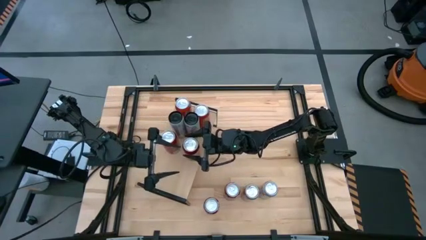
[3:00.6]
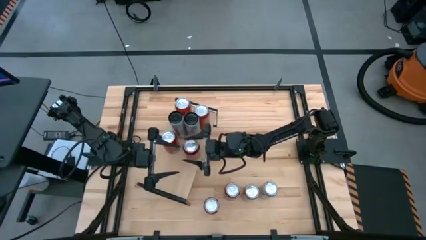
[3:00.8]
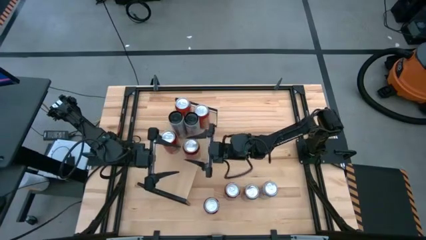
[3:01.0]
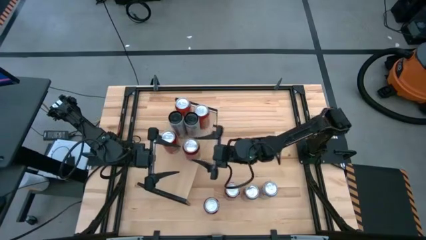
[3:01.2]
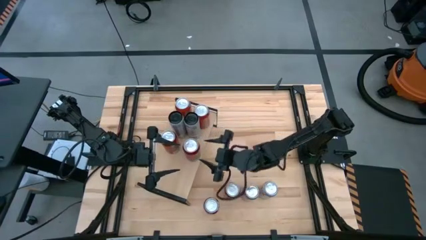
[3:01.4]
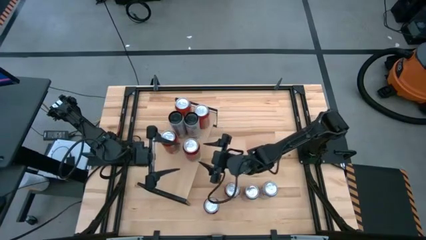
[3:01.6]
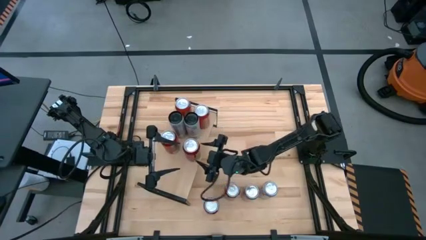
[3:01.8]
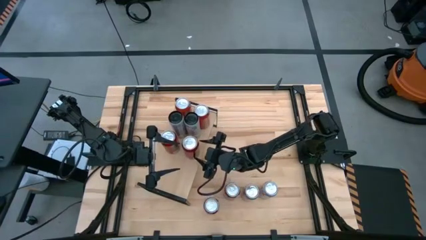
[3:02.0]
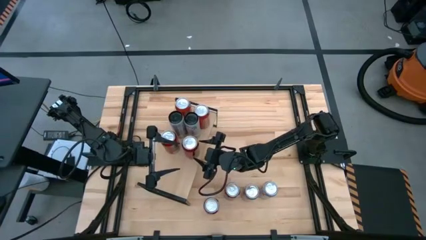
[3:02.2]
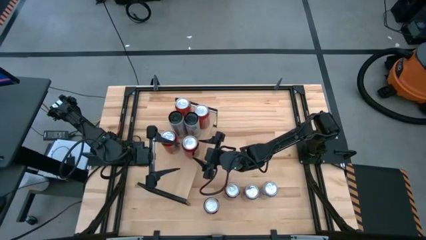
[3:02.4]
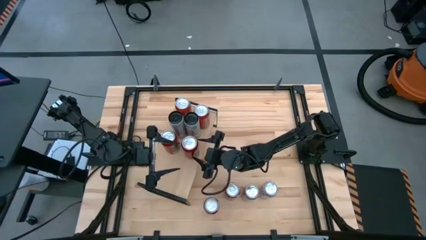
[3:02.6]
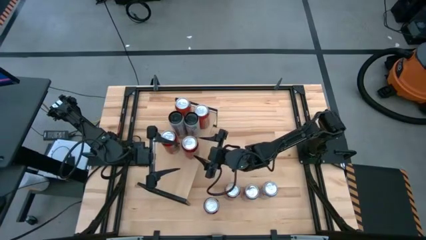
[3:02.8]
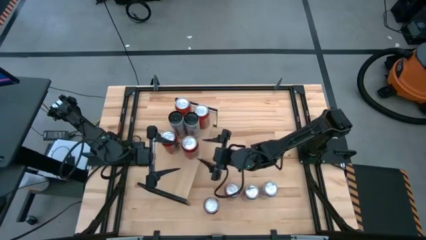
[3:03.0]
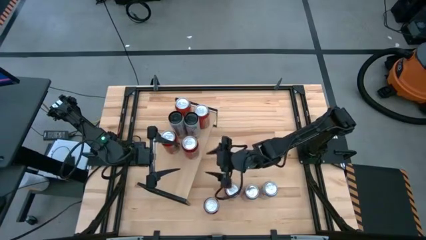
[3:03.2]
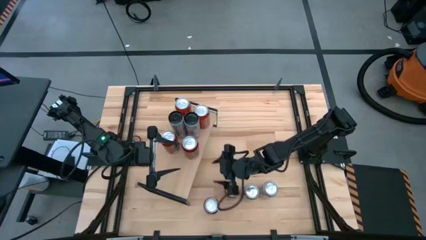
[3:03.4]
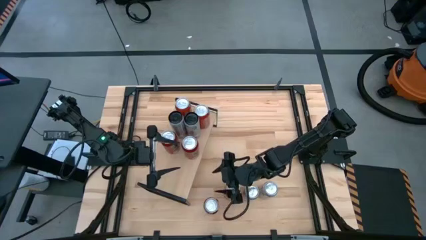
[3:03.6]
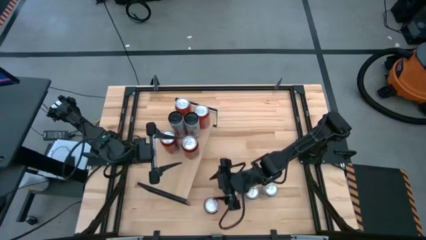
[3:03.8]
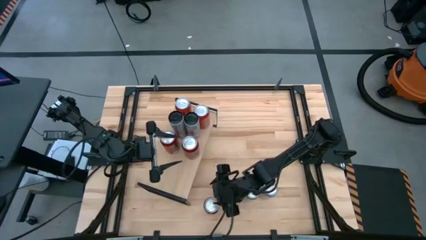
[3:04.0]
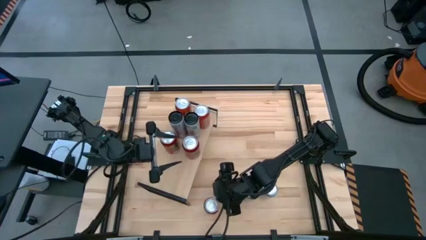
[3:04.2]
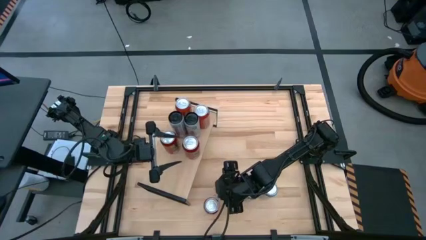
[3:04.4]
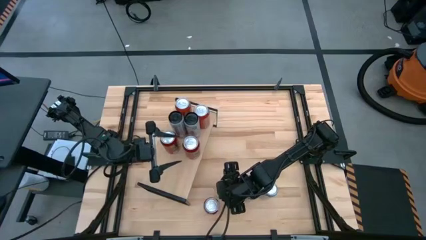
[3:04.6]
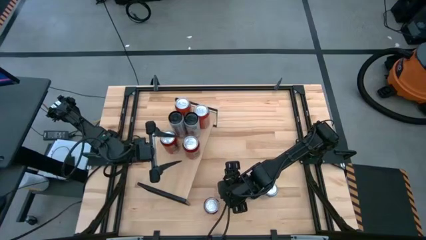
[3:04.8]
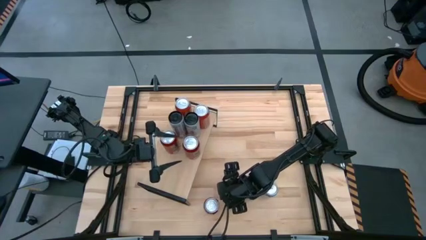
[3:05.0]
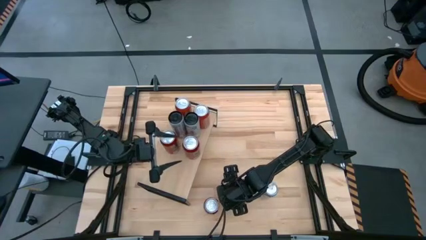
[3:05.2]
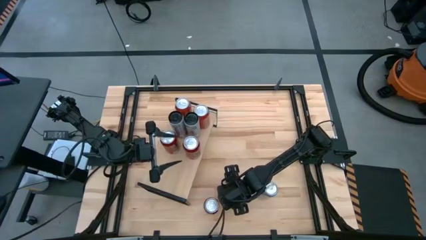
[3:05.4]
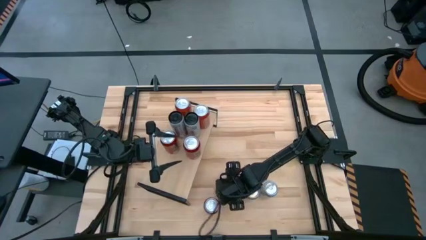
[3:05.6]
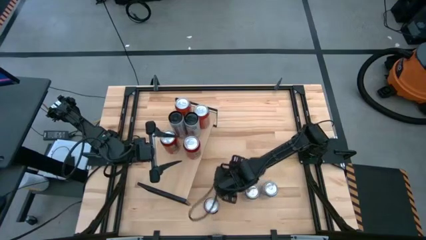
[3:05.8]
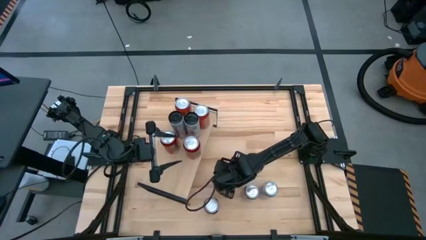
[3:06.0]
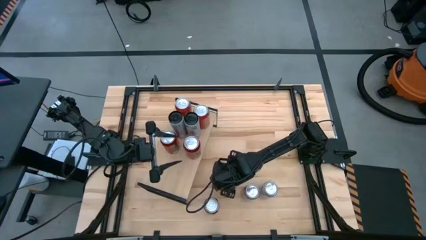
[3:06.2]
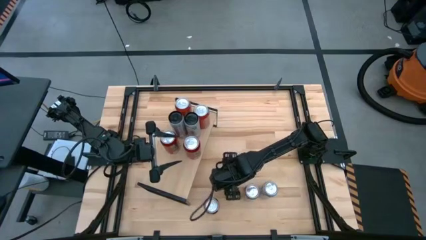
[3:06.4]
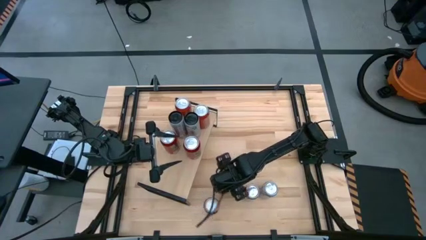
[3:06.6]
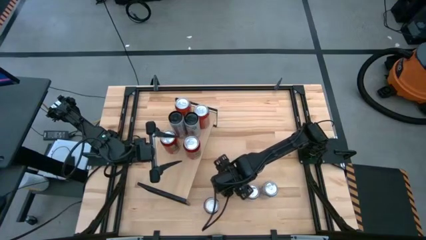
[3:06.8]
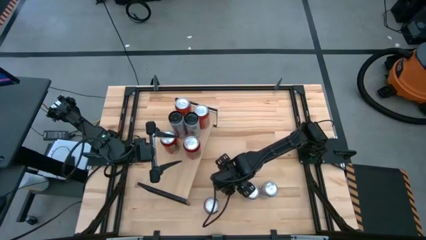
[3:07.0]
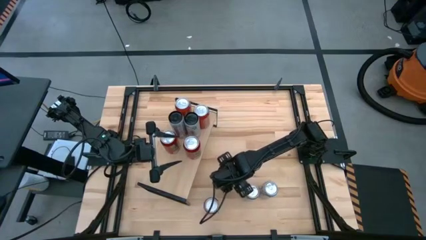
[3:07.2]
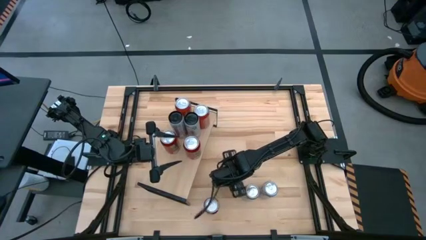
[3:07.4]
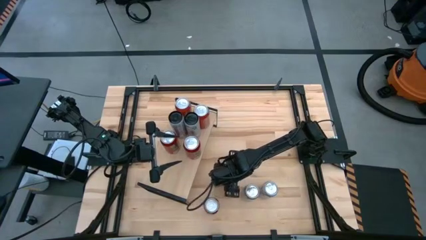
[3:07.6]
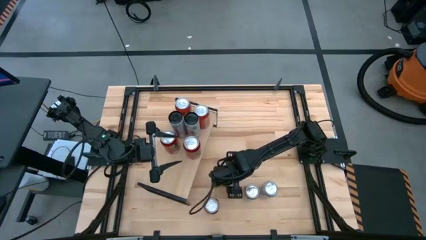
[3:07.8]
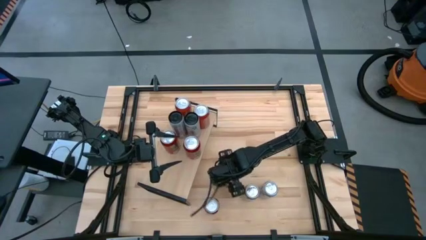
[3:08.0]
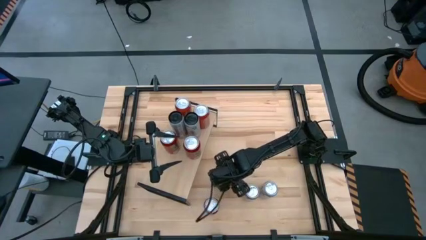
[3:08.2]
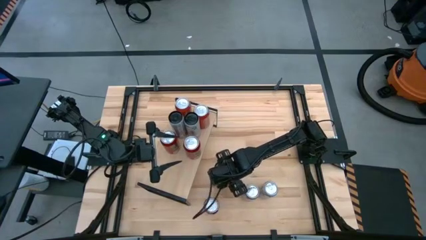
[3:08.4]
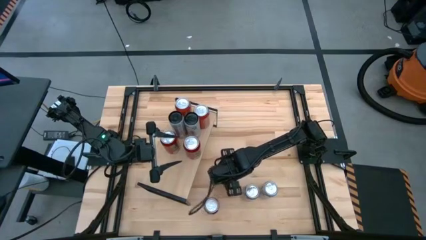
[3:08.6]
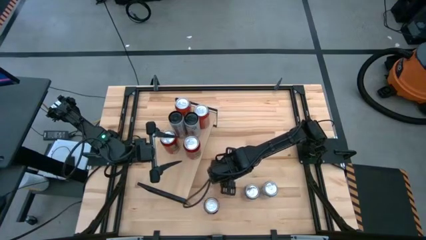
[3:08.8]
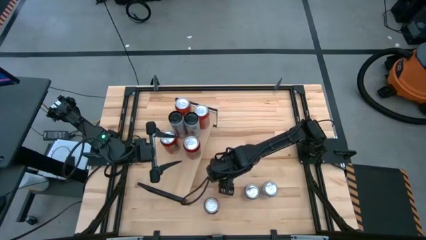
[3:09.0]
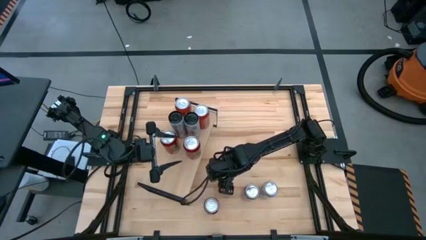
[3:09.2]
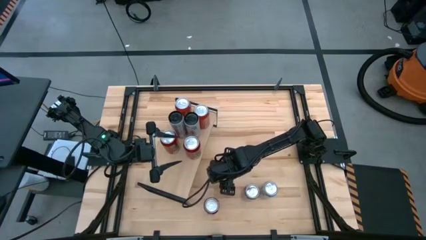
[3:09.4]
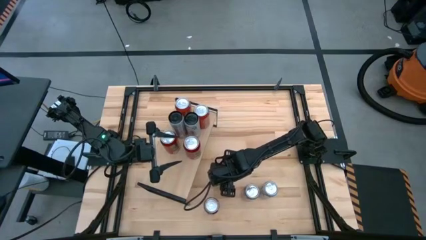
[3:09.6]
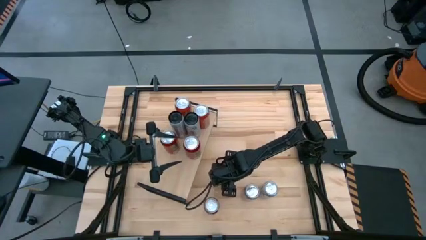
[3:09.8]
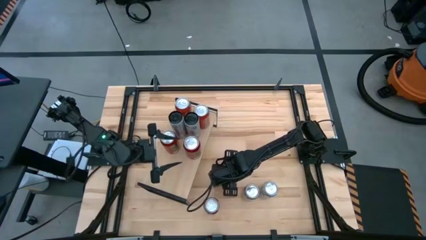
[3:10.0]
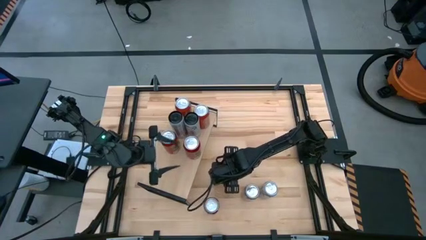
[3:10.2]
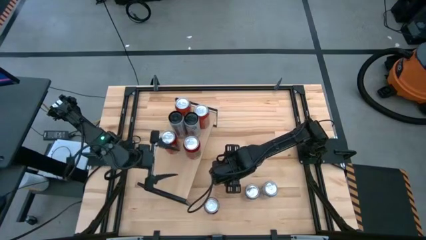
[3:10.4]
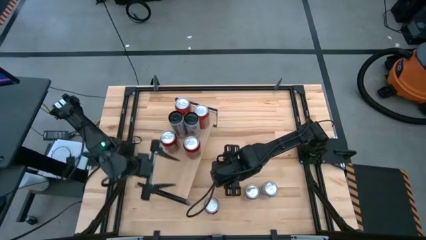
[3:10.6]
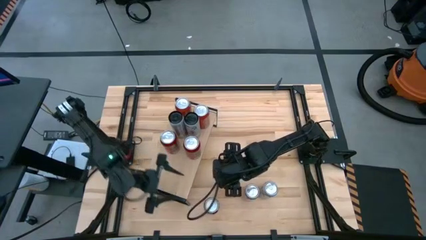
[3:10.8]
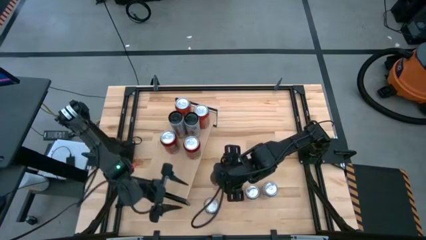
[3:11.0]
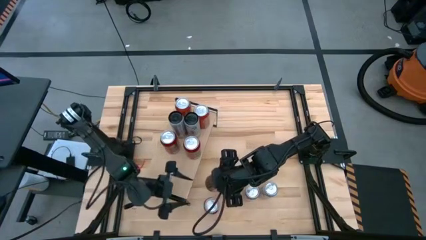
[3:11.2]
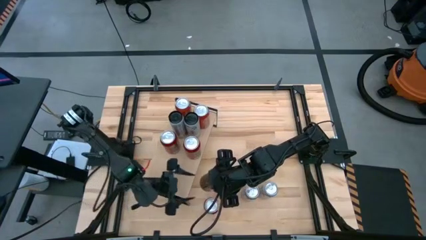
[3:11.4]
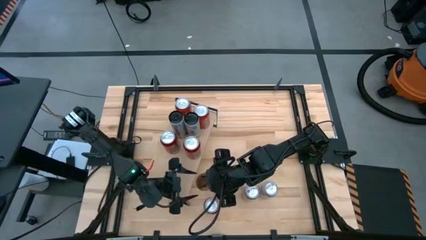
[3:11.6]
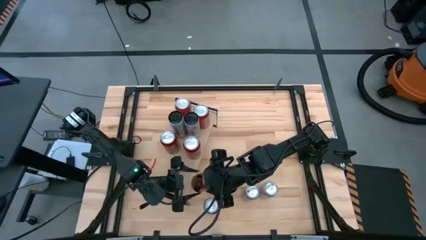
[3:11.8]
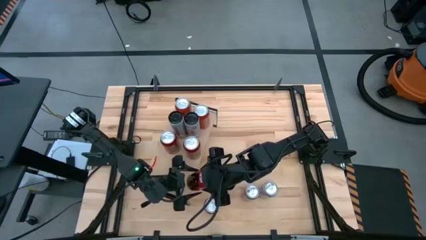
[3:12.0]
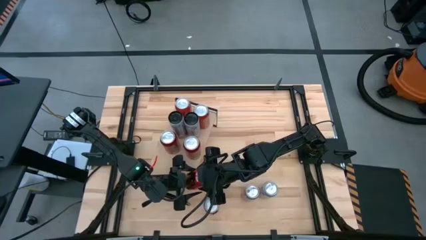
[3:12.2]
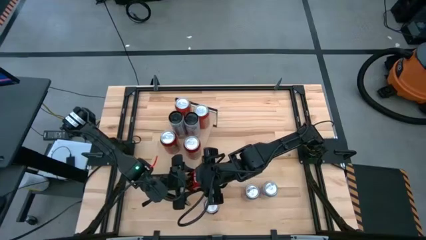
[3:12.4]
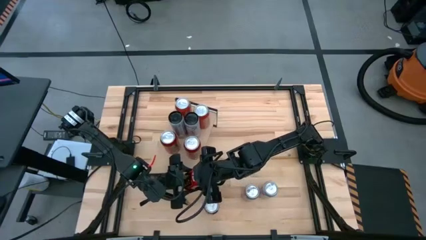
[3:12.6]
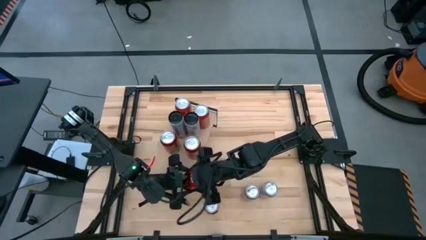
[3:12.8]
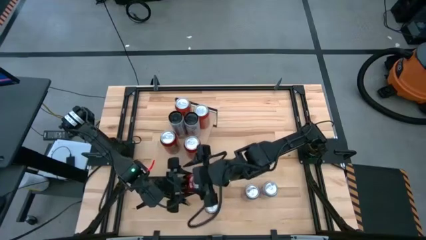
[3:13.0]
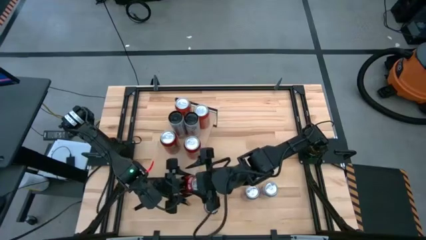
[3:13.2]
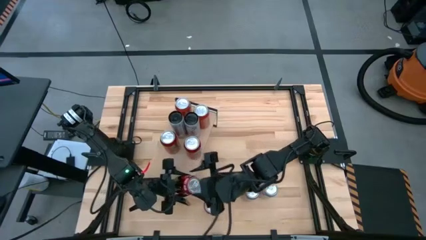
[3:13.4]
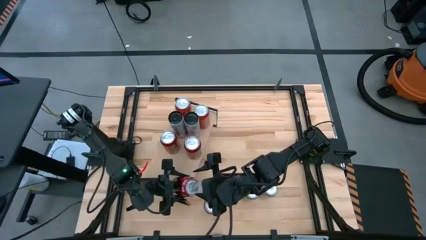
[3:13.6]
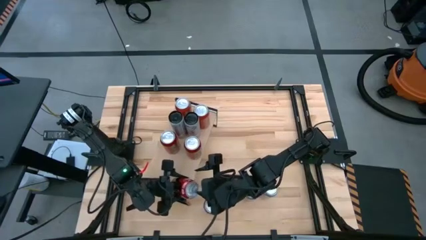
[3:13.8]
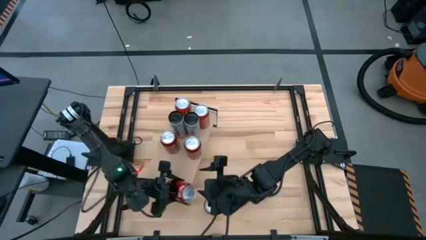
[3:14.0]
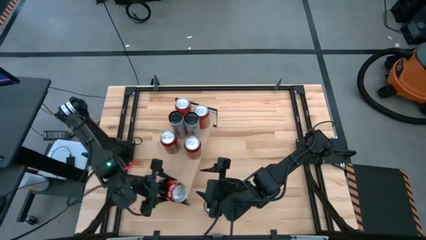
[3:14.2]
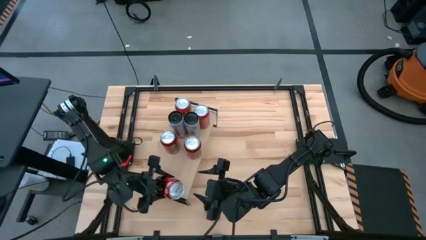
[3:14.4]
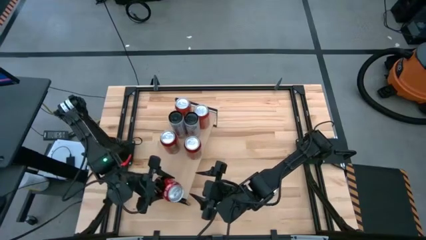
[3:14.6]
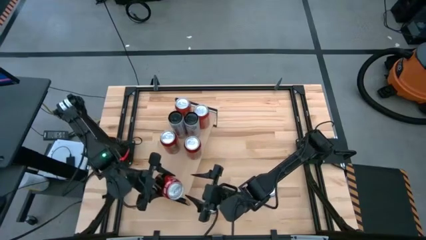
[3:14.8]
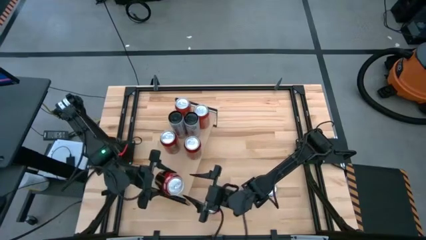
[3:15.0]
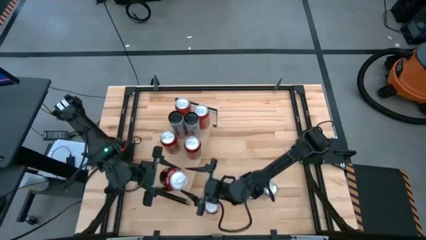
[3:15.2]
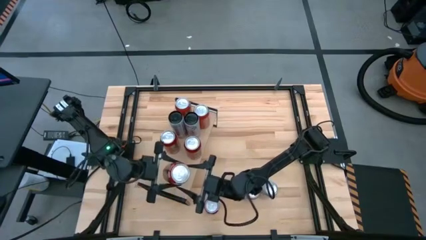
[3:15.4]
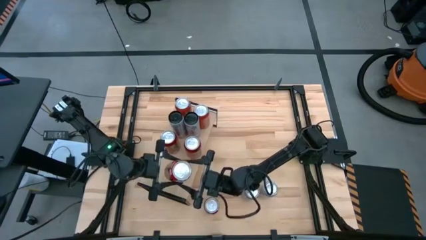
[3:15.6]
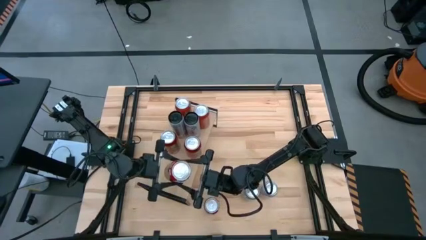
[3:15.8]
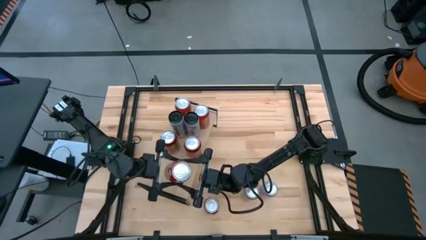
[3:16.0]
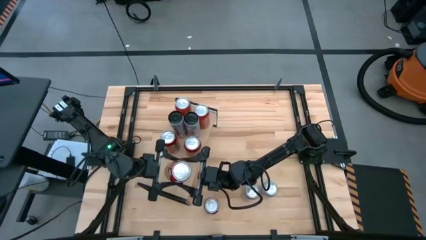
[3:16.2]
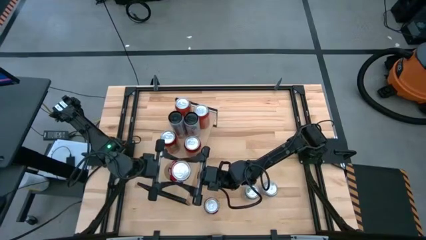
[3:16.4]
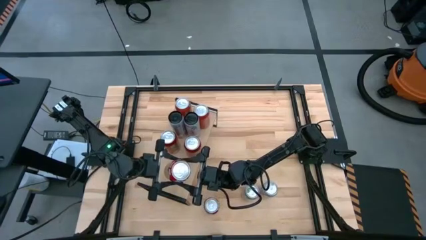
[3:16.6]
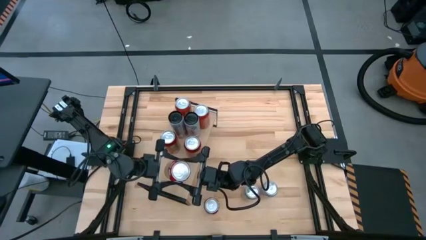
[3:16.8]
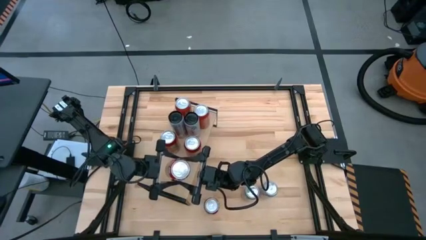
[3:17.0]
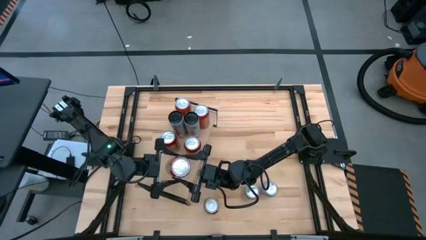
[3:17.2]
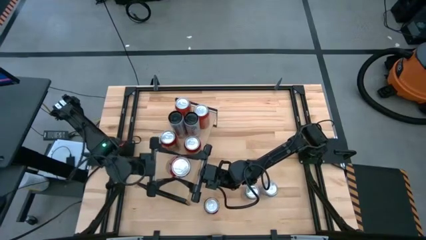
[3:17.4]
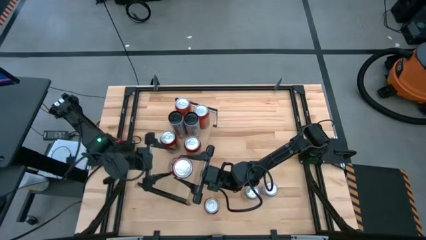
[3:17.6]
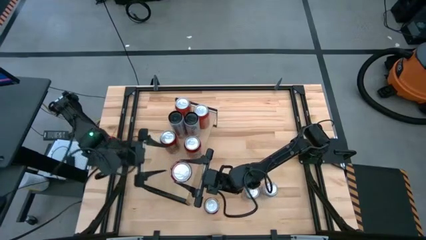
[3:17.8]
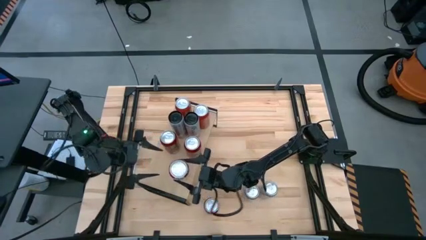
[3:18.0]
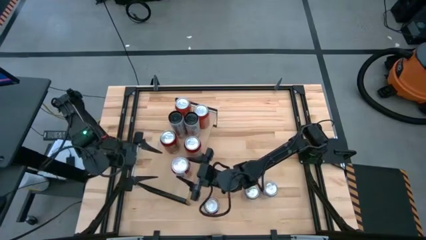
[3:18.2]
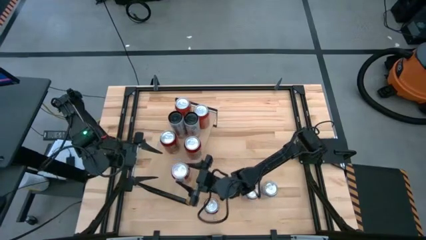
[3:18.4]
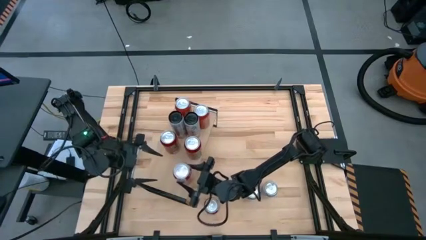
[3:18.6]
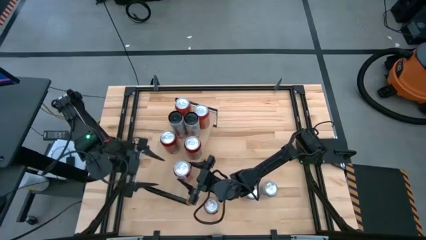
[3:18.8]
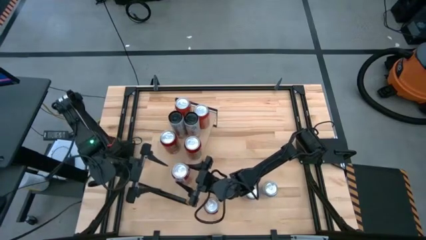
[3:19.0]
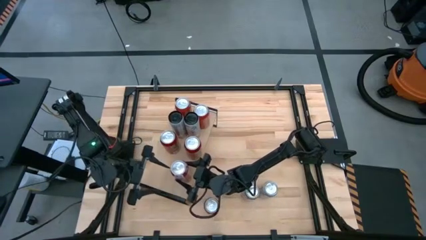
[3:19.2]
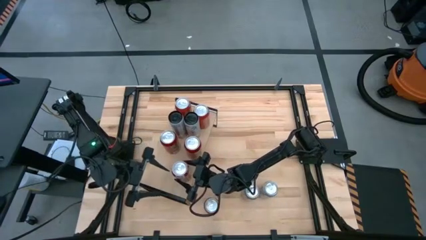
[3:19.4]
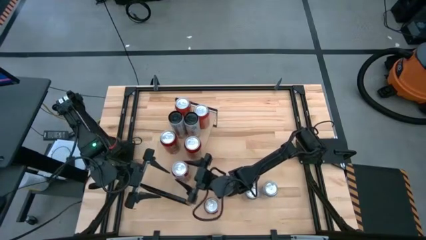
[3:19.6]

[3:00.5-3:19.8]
Task: Place canned beverage on shelf
Put the right red soda can on the shelf
